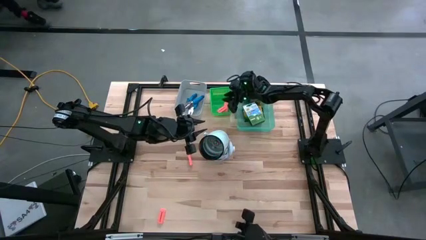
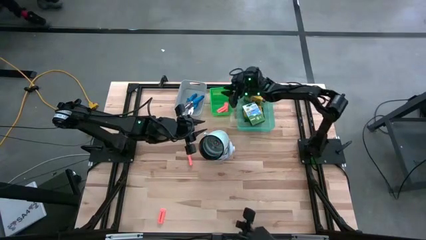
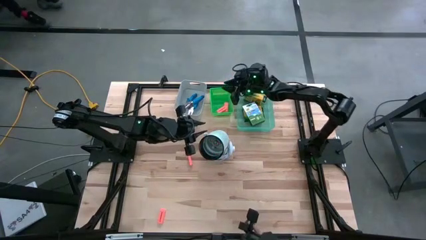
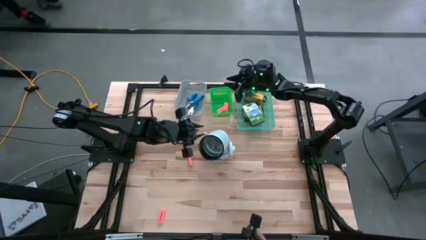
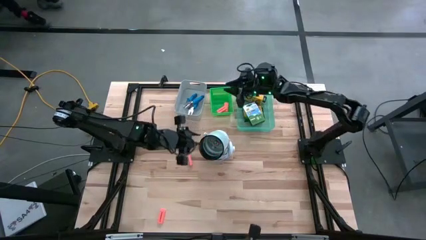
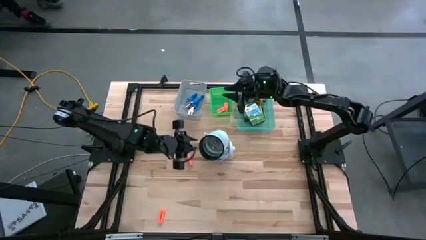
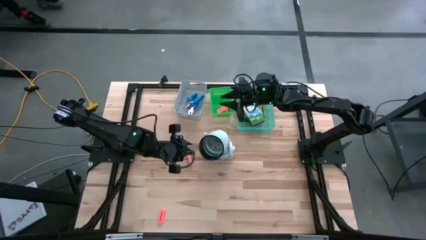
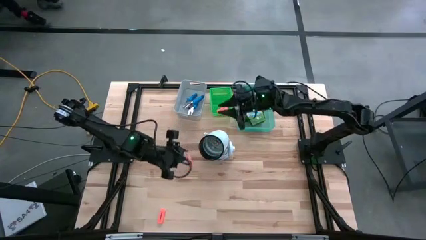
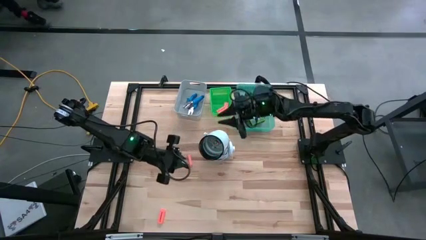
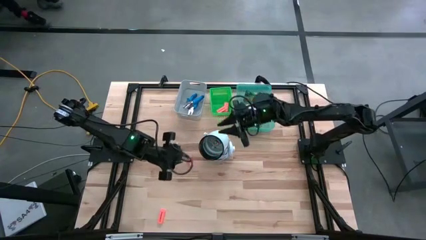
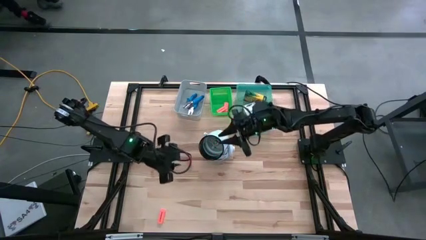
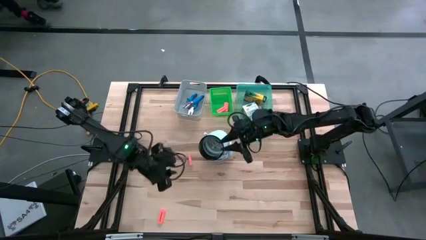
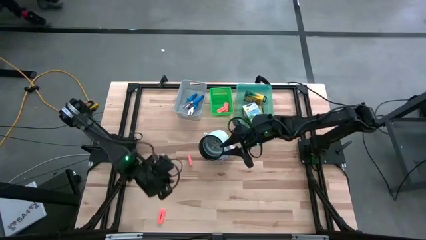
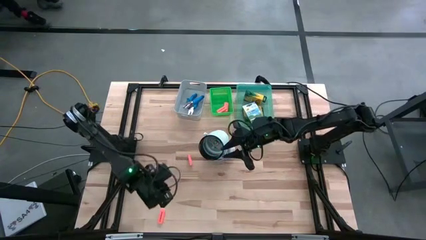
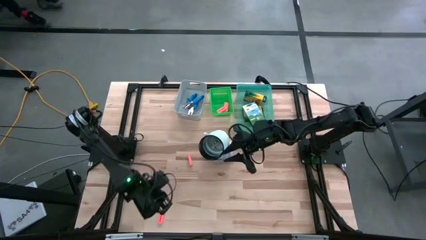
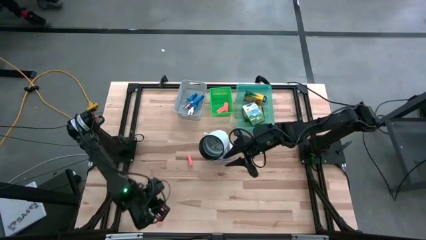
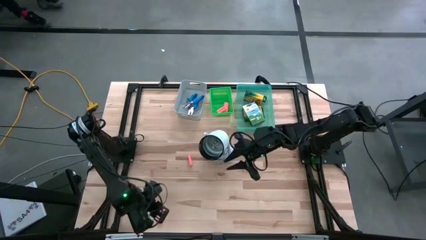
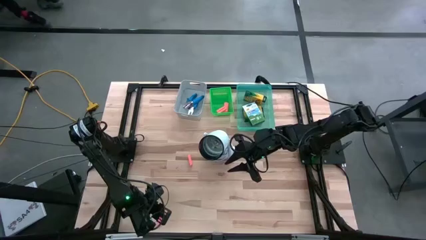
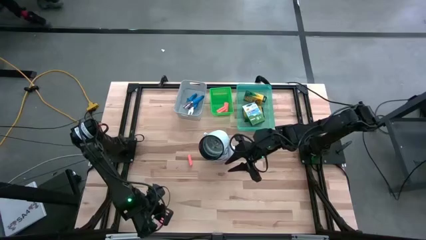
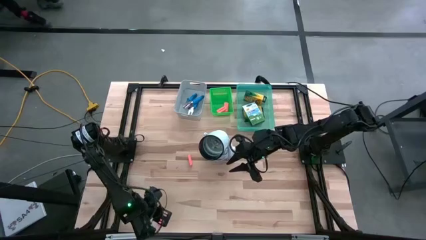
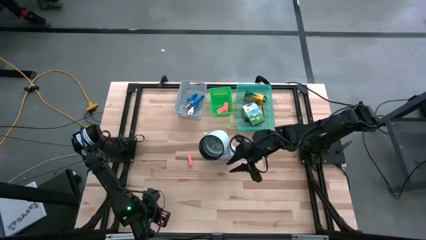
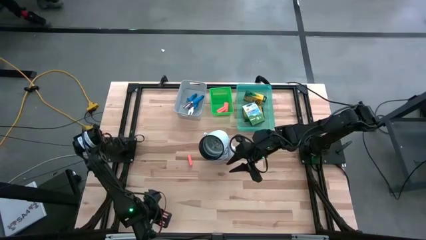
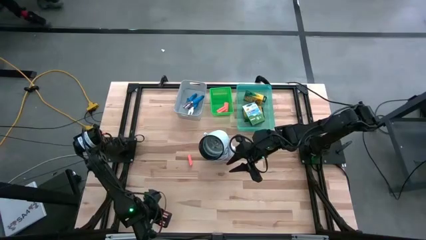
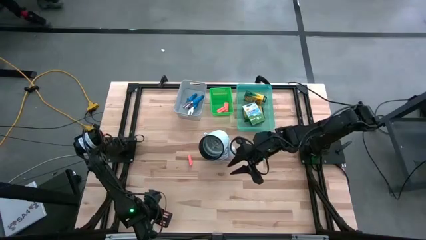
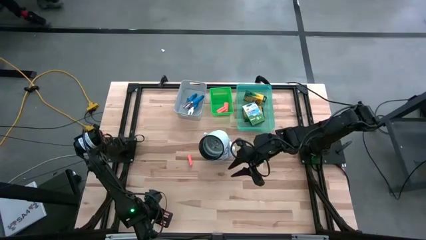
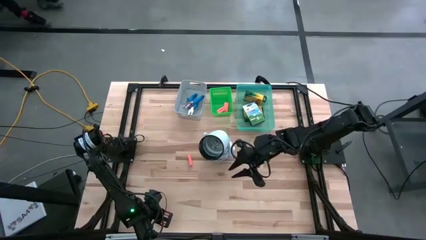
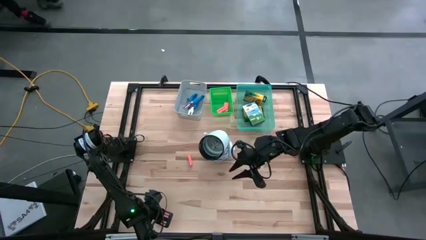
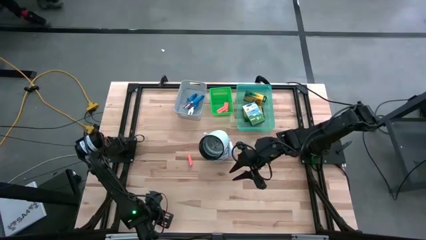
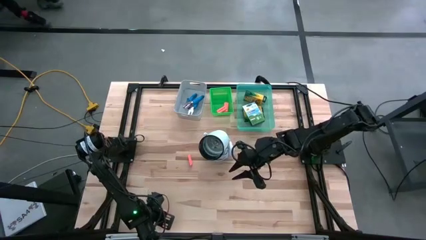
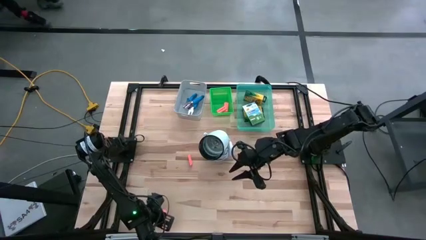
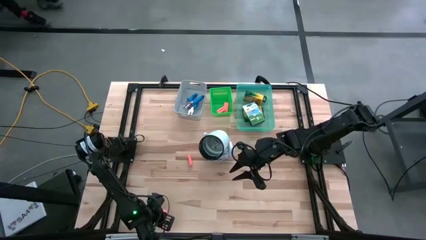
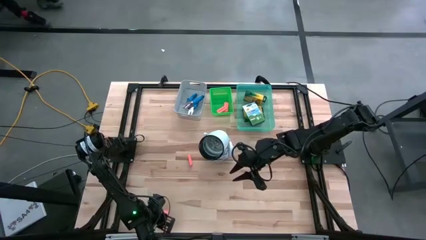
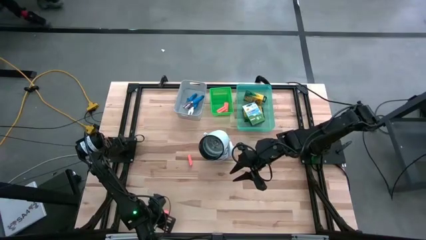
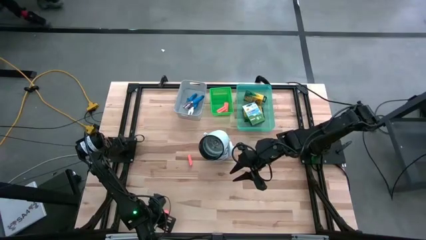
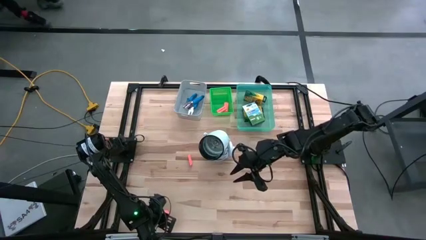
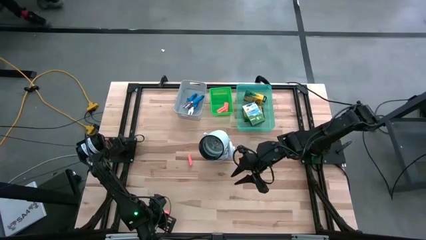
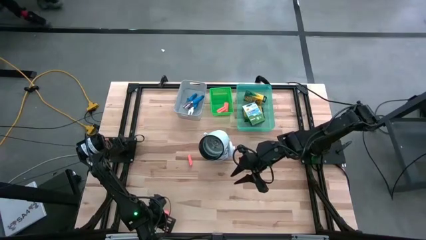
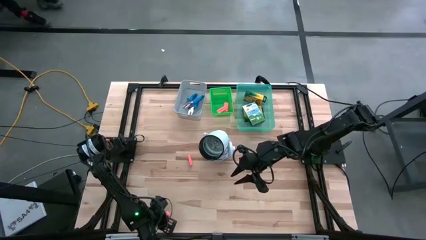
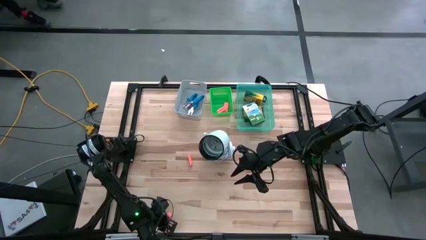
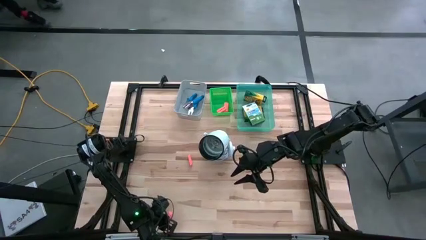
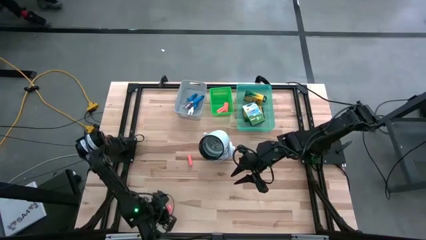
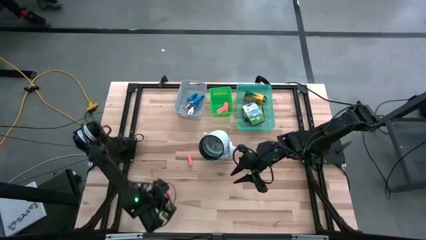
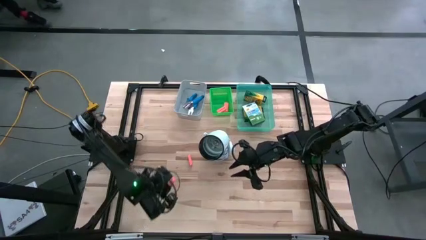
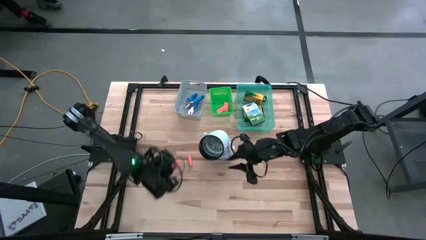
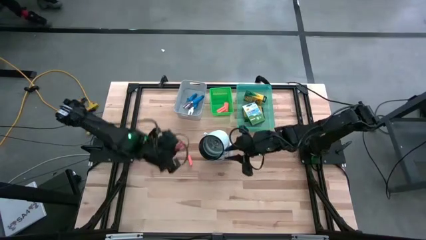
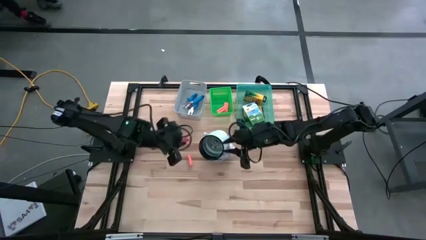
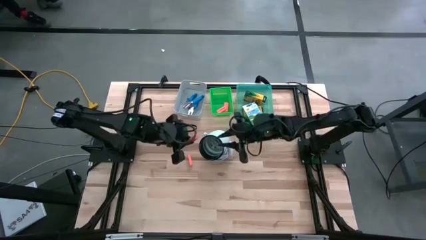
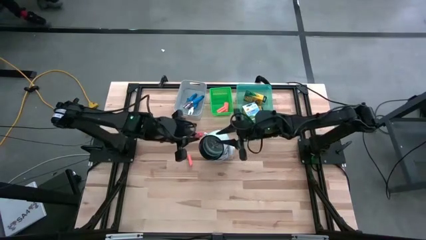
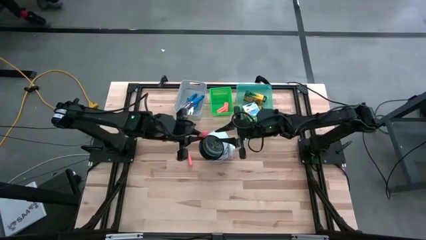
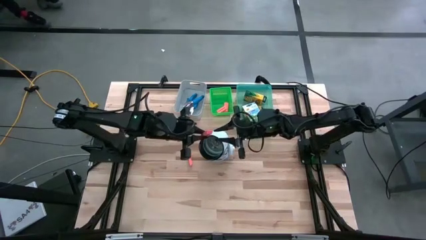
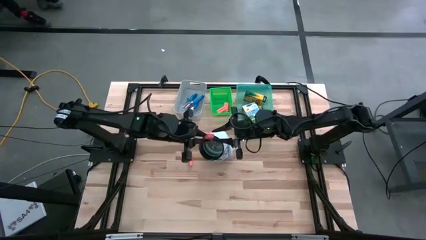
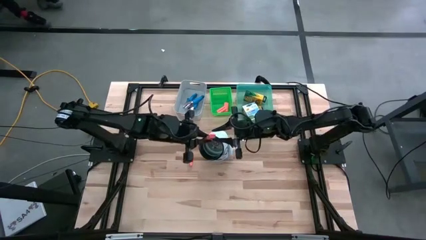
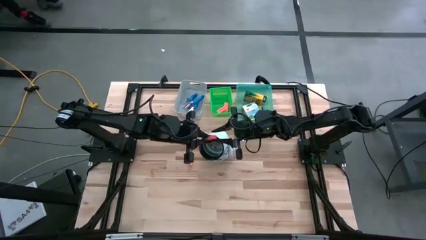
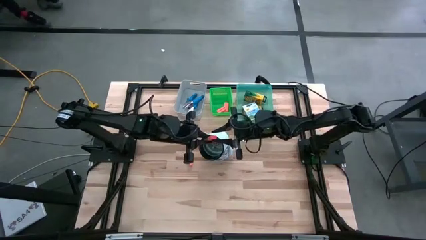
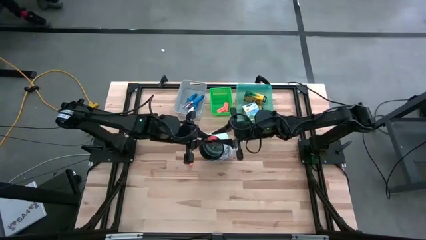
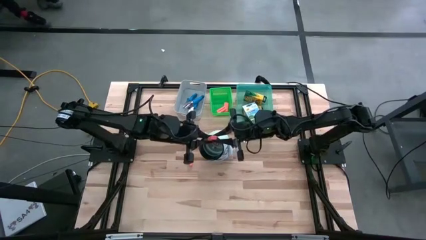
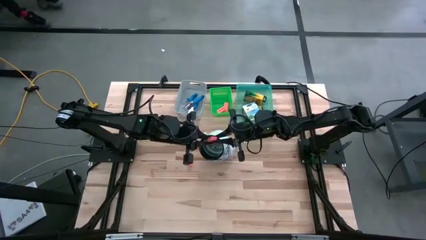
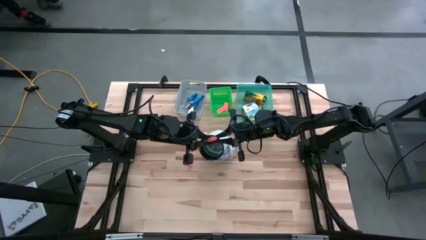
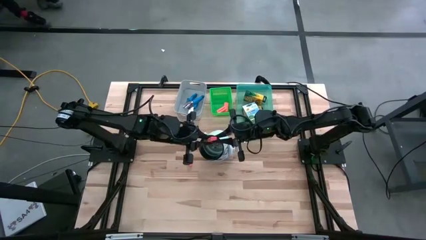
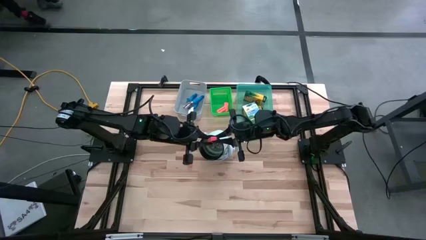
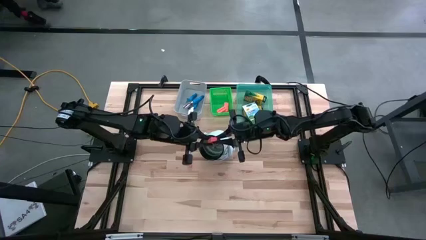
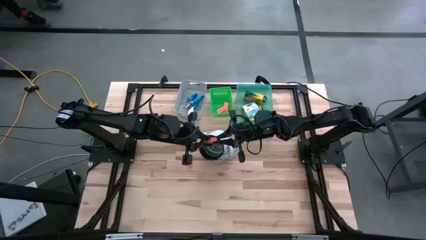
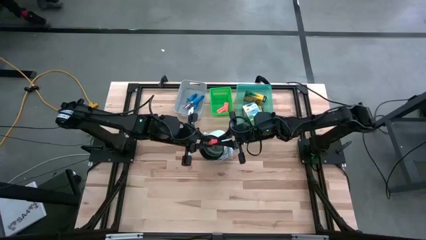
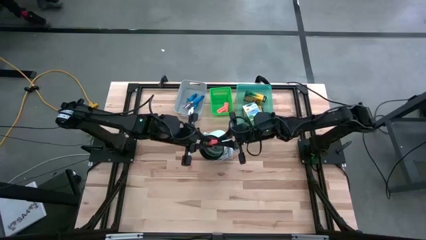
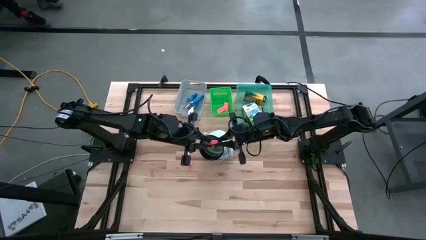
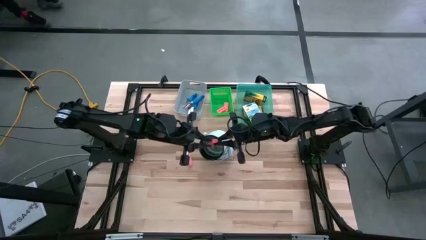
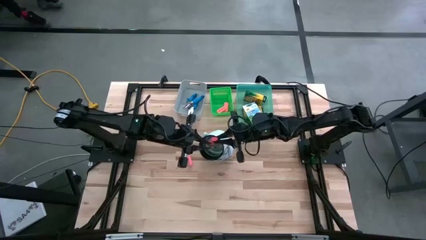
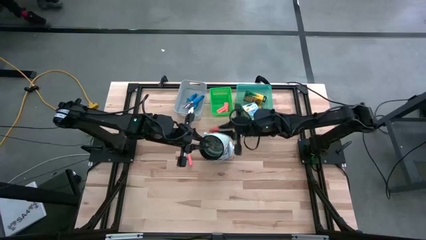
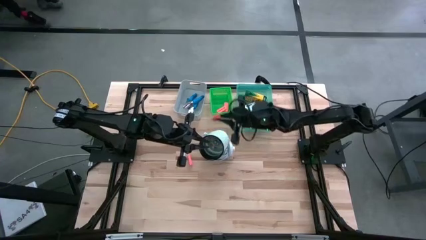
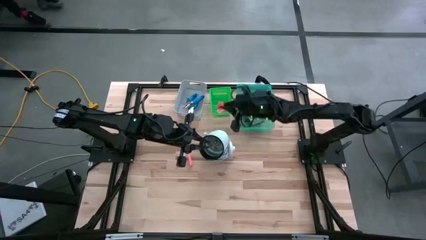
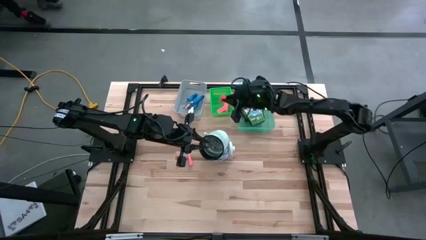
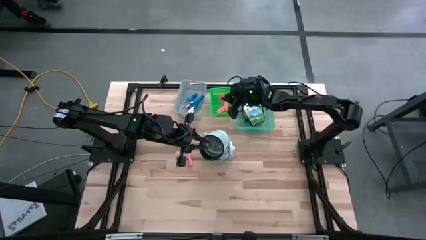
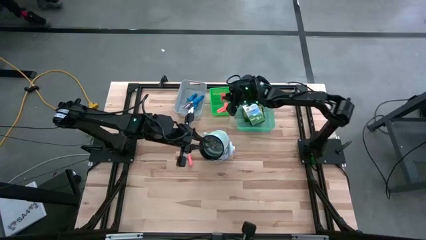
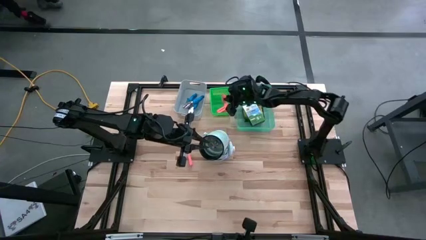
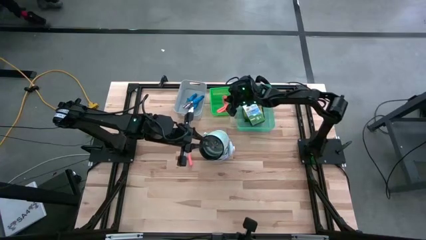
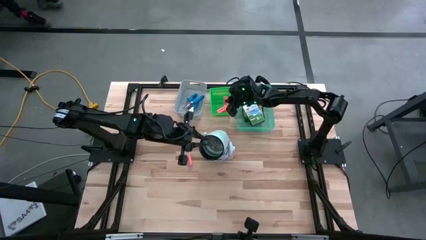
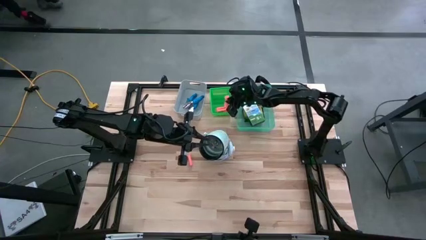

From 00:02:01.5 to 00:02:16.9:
Task: Pick & Place School Supplies
Put the orange eraser into the green bin

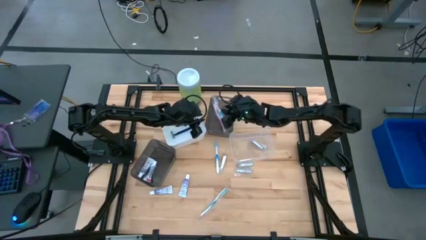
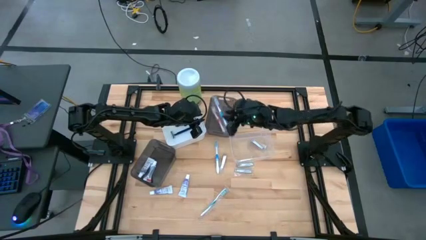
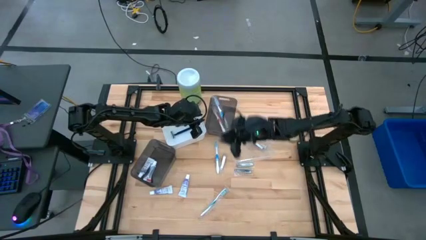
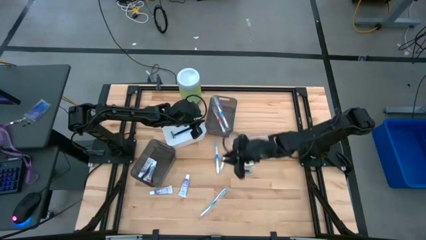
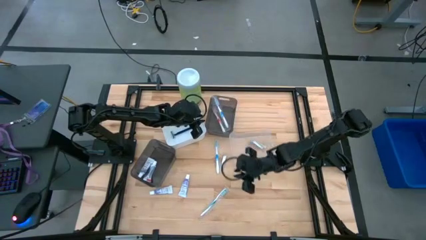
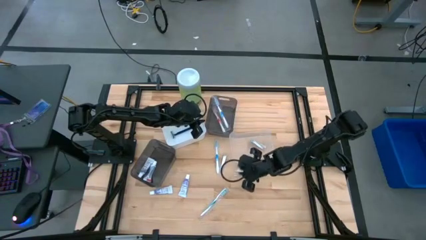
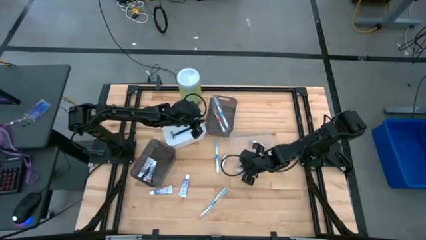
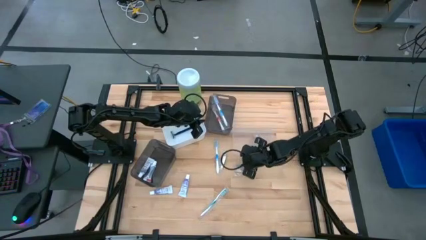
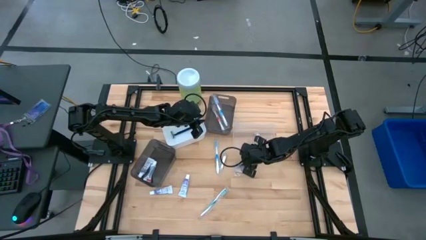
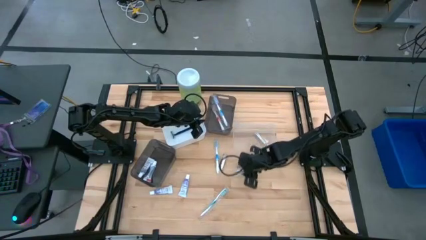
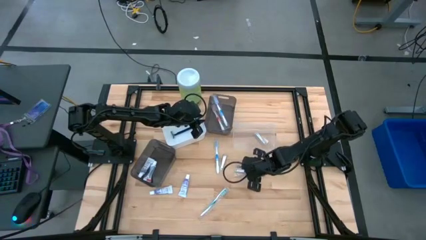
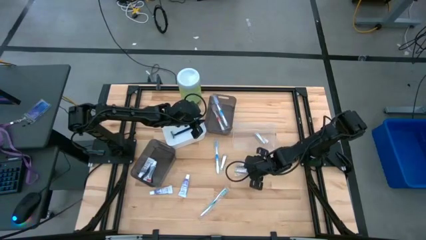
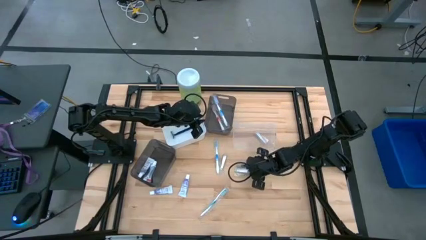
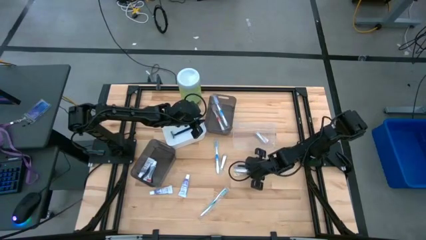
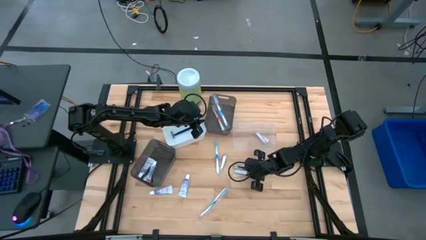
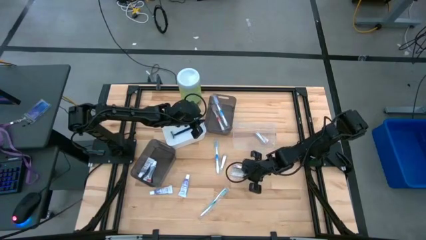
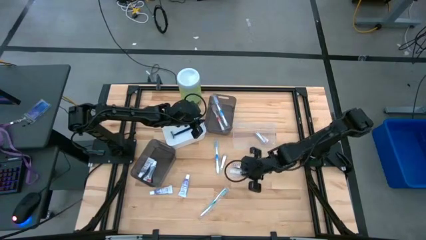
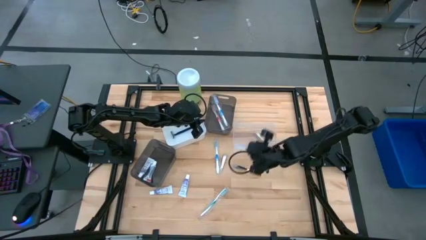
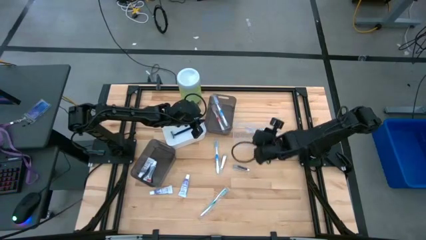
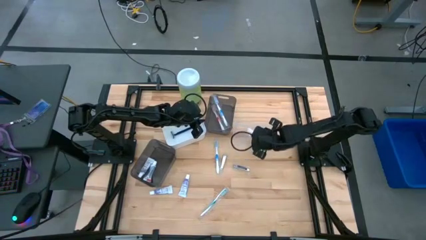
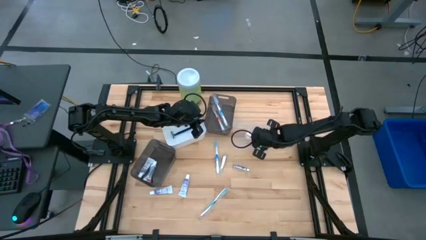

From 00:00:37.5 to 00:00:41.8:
Task: Pick & Place Travel size toiletries
Put the silver nail cutter into the transparent bin
